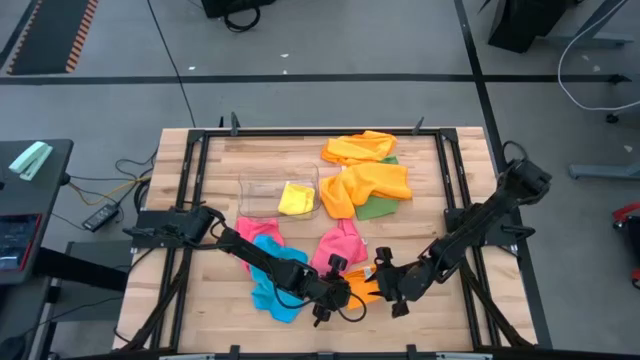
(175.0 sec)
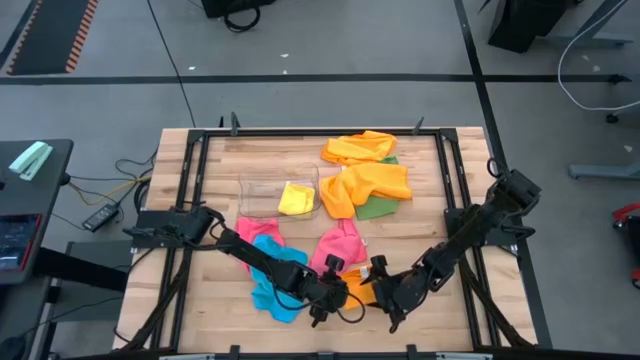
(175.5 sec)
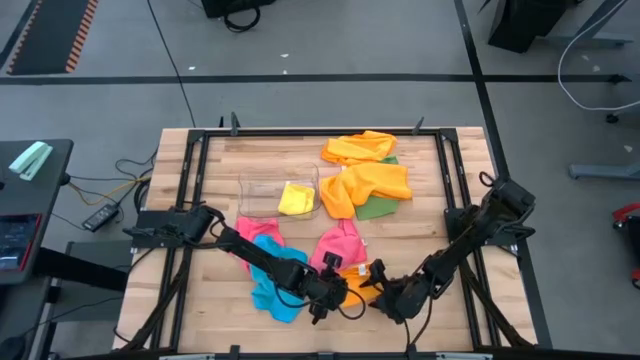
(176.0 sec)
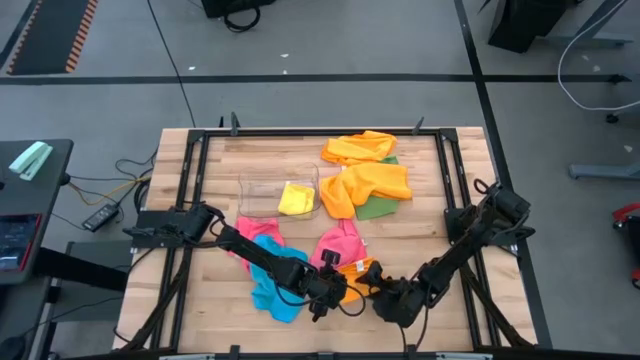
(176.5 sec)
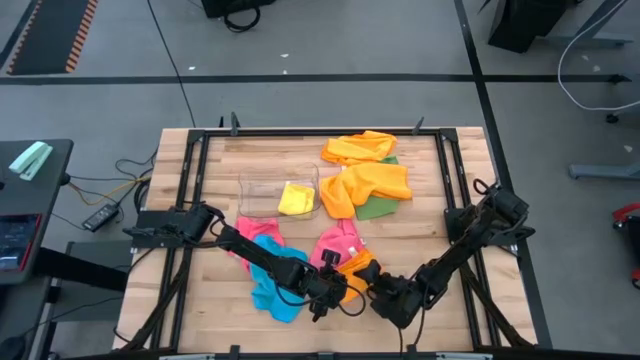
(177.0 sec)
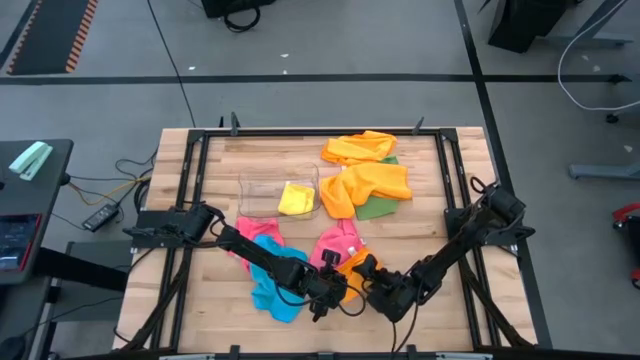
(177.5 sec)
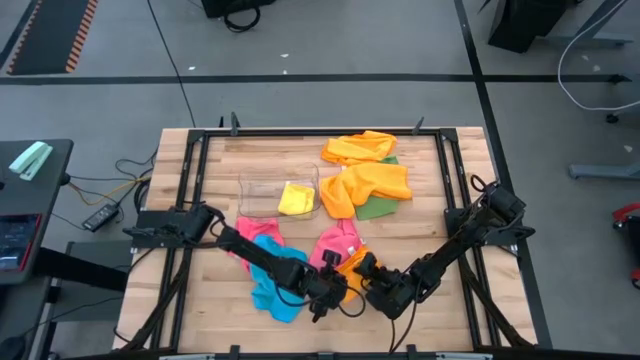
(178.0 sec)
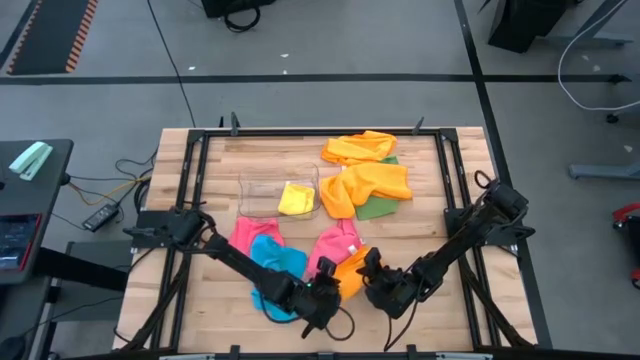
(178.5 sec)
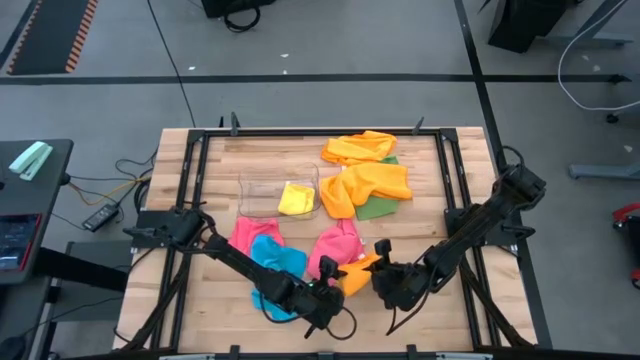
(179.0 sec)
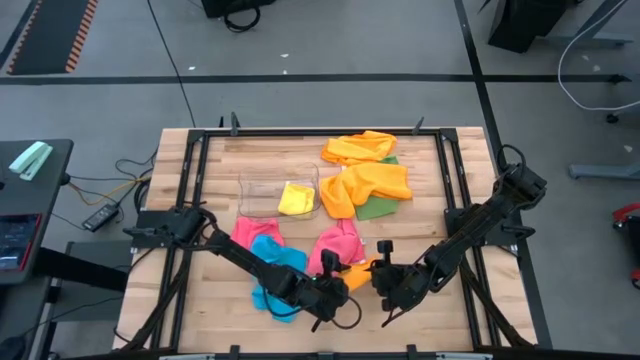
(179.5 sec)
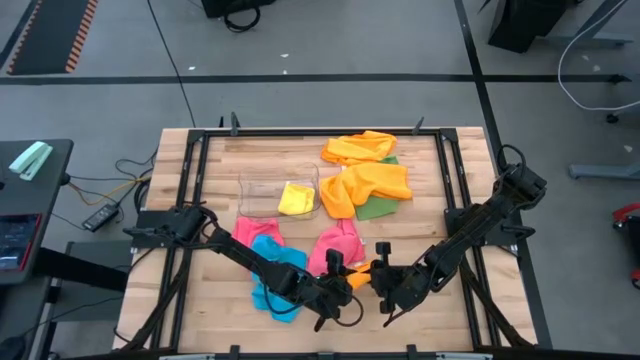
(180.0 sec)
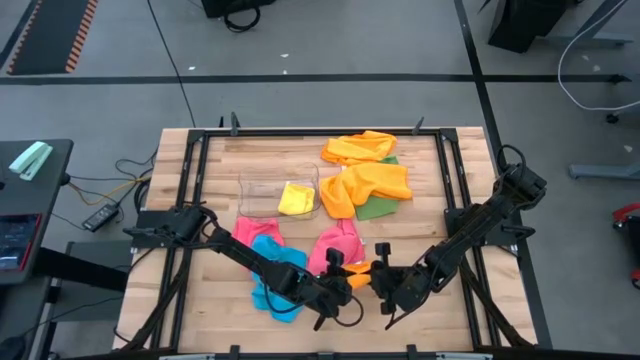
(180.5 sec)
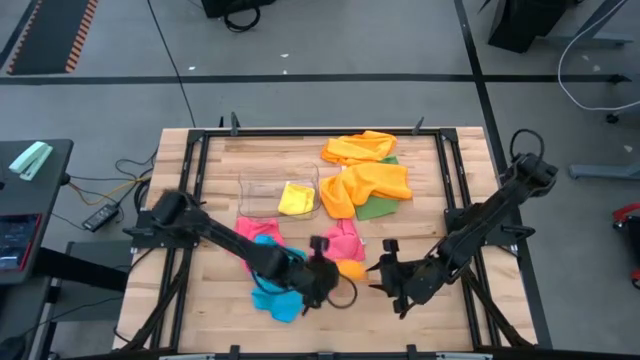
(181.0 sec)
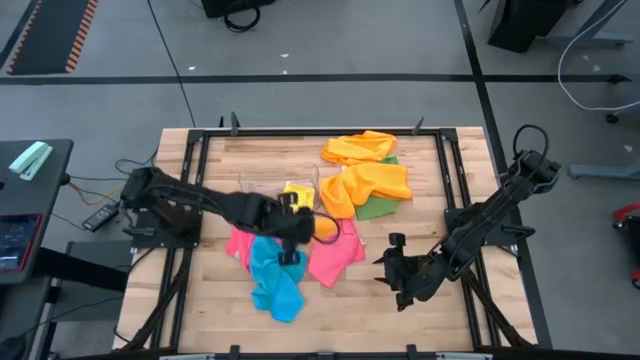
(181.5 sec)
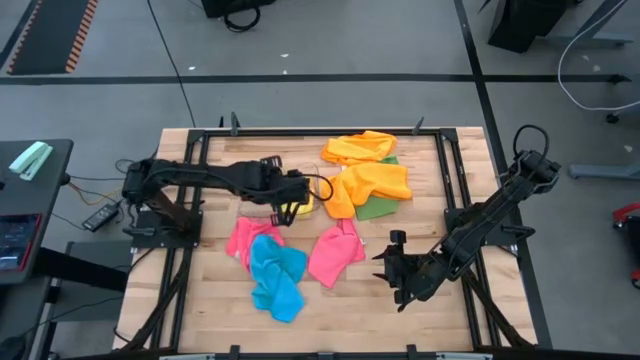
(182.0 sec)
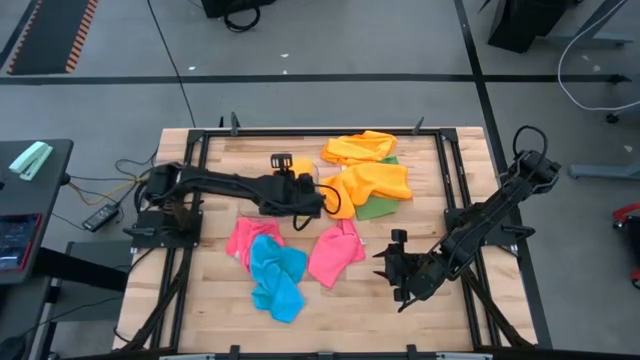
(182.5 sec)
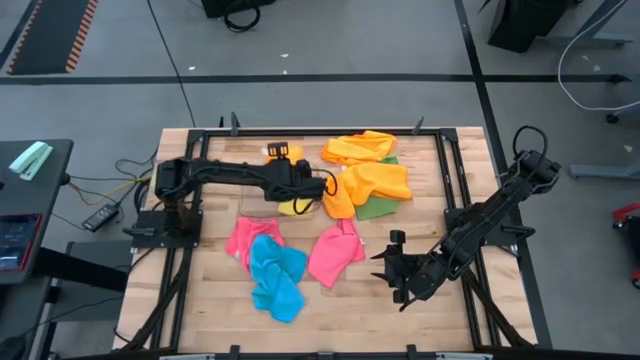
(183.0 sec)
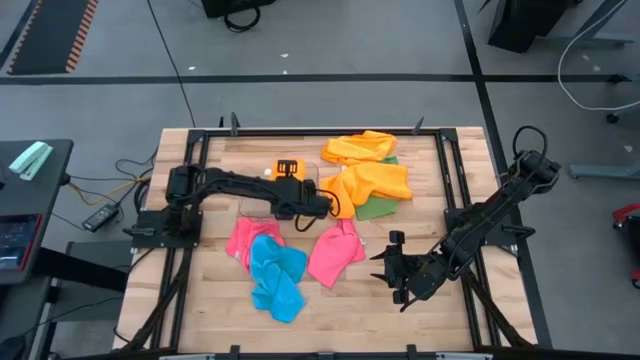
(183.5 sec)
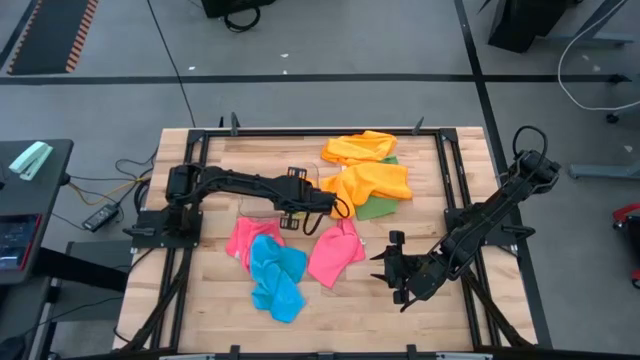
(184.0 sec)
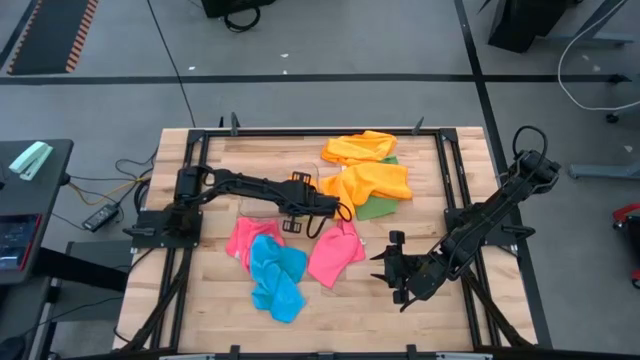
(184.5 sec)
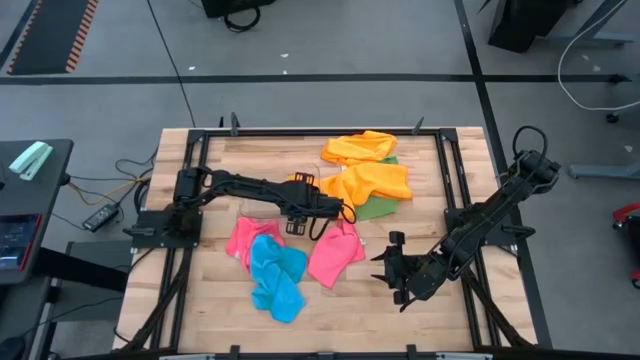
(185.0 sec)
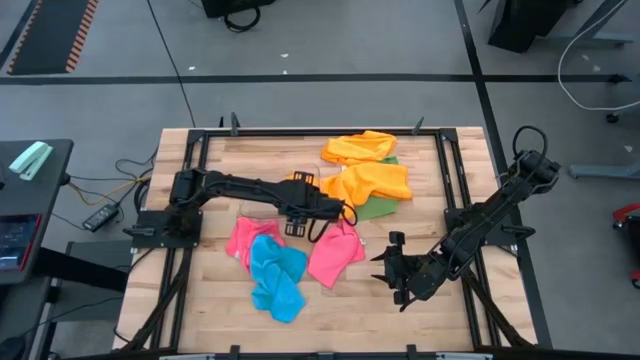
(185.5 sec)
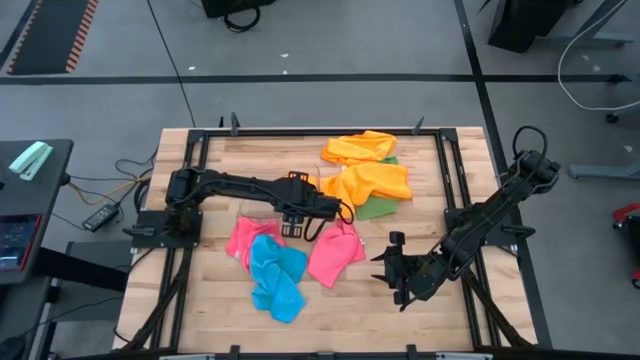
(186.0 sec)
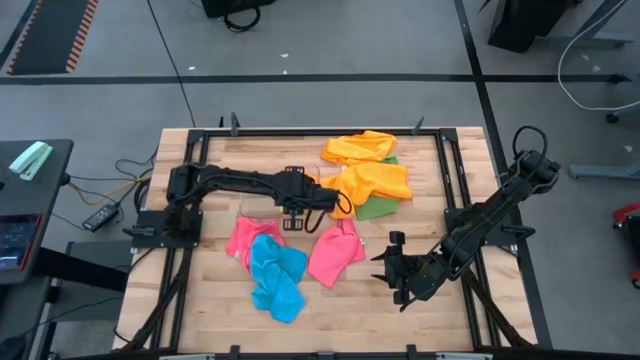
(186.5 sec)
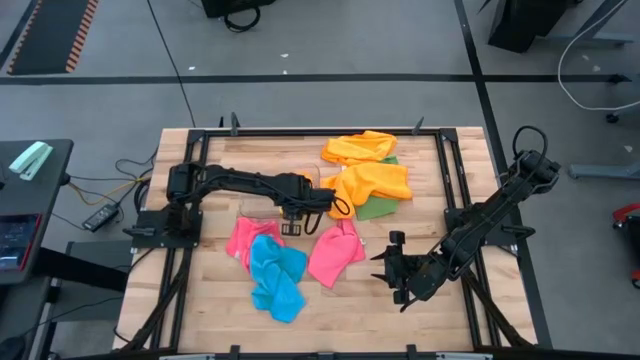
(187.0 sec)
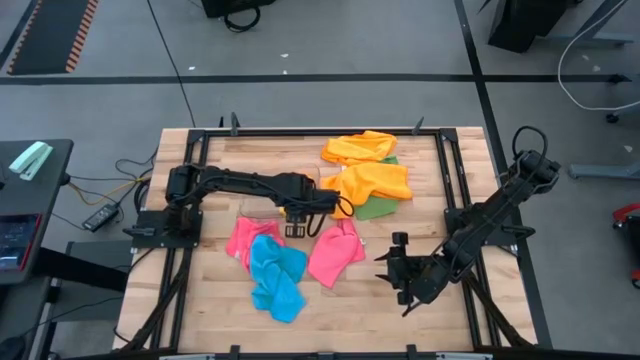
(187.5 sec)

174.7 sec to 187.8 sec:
Task: Fold microfiber towels
Put the bottom folded orange microfiber cloth into the transparent bin
